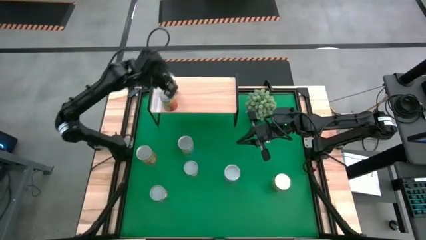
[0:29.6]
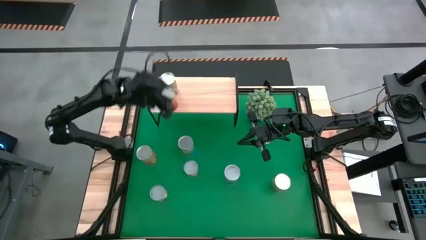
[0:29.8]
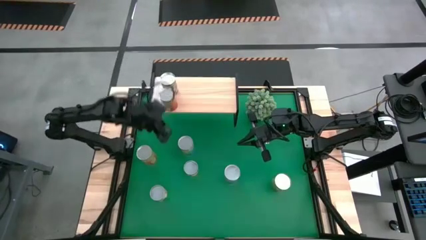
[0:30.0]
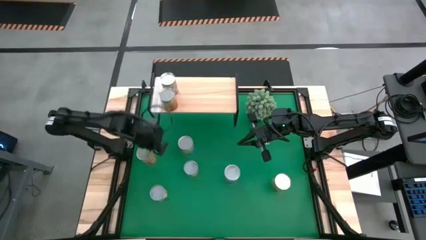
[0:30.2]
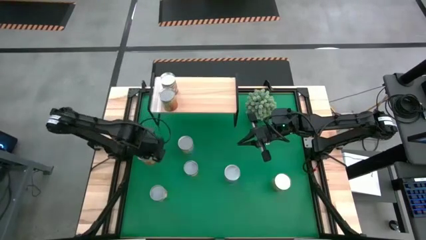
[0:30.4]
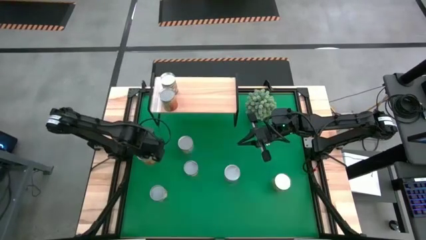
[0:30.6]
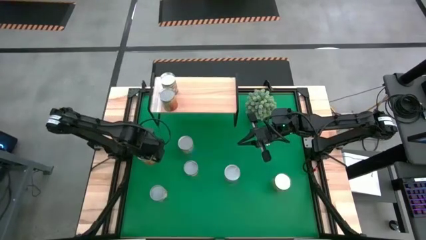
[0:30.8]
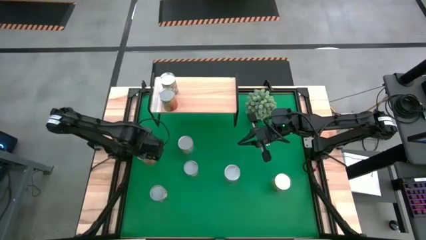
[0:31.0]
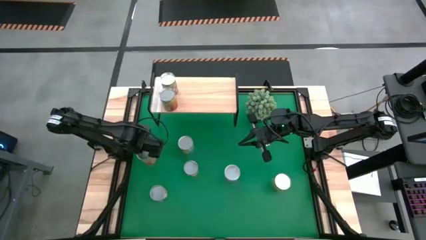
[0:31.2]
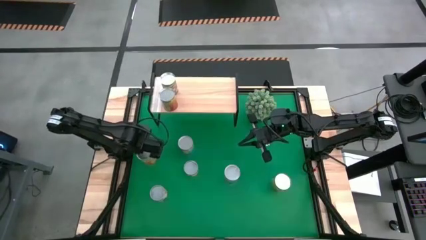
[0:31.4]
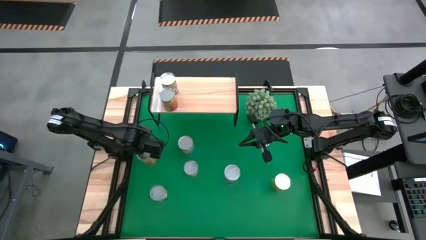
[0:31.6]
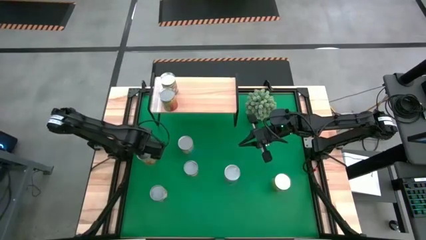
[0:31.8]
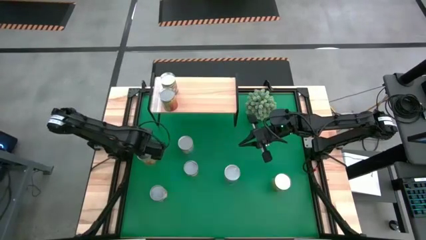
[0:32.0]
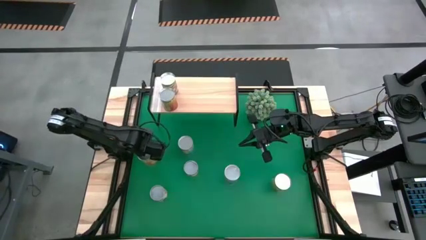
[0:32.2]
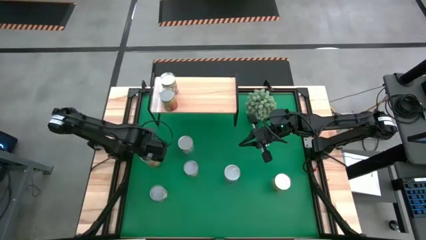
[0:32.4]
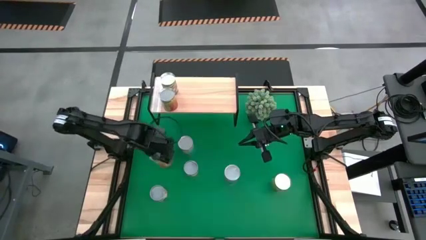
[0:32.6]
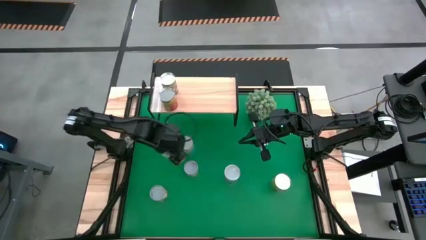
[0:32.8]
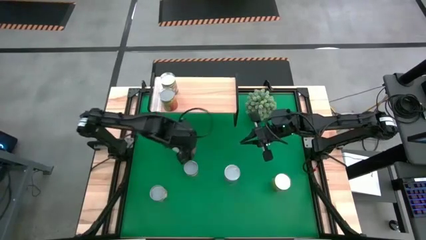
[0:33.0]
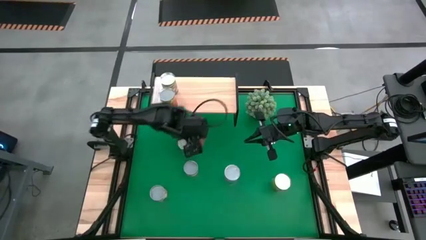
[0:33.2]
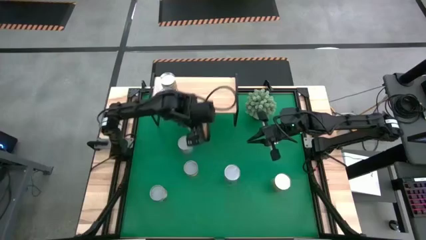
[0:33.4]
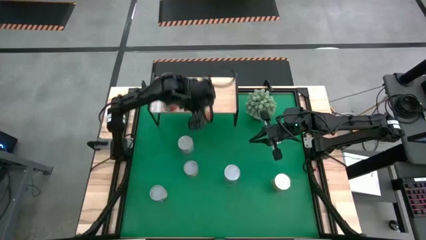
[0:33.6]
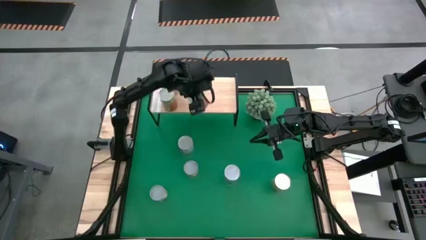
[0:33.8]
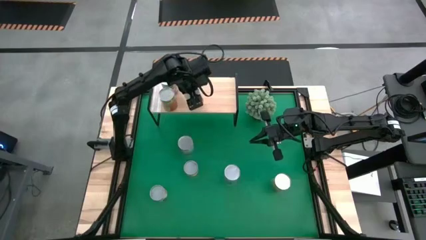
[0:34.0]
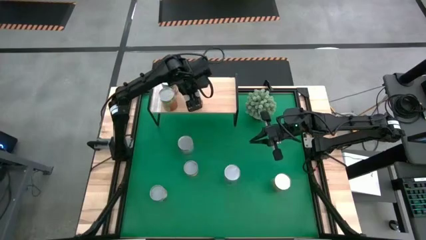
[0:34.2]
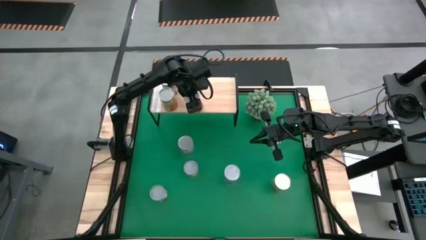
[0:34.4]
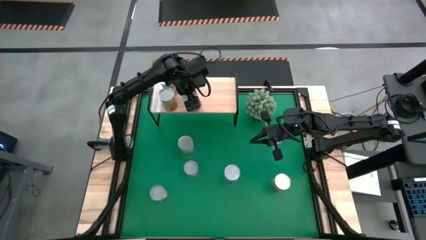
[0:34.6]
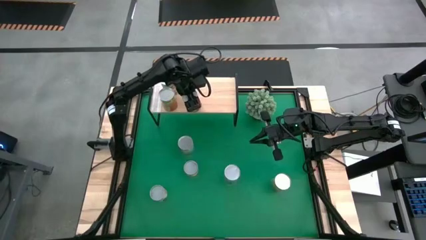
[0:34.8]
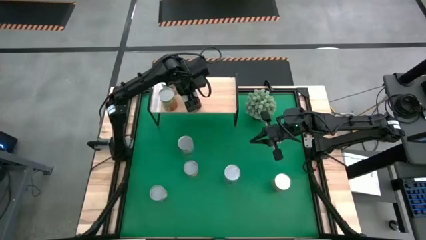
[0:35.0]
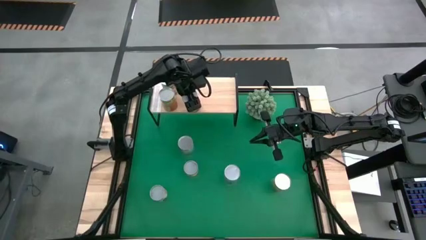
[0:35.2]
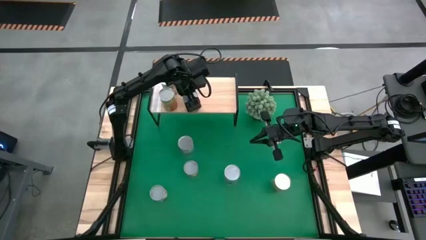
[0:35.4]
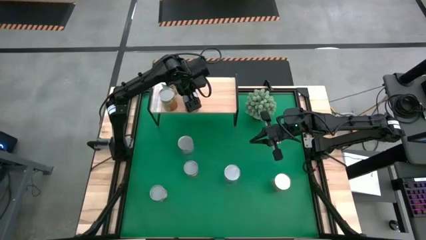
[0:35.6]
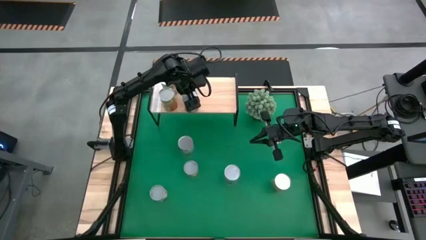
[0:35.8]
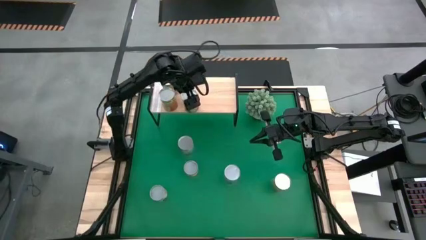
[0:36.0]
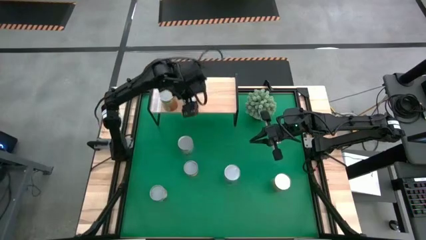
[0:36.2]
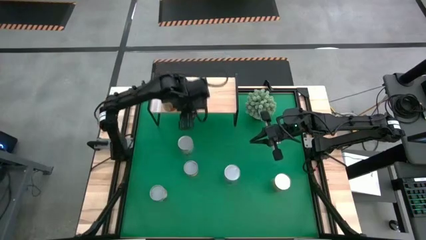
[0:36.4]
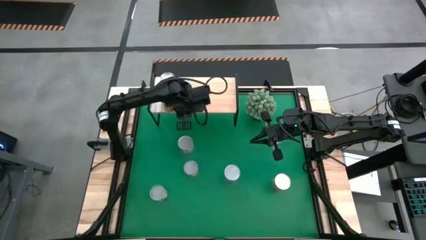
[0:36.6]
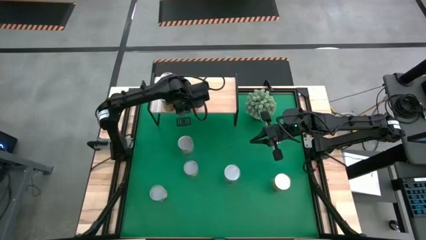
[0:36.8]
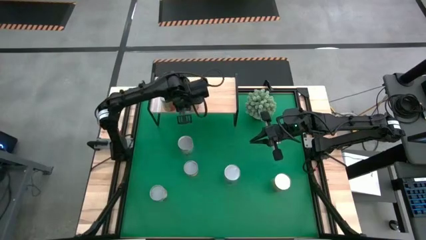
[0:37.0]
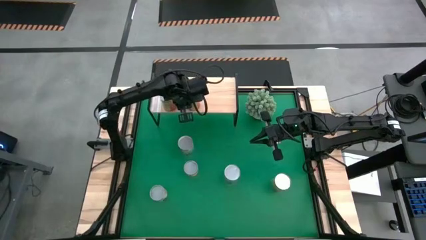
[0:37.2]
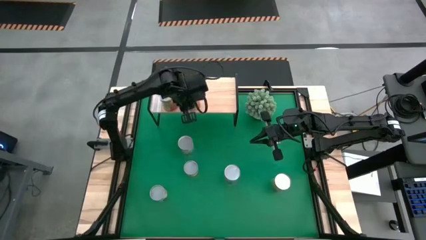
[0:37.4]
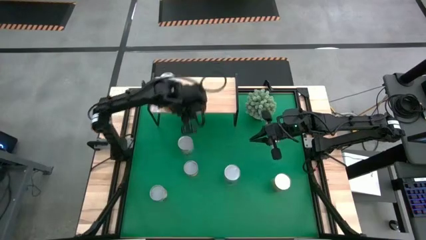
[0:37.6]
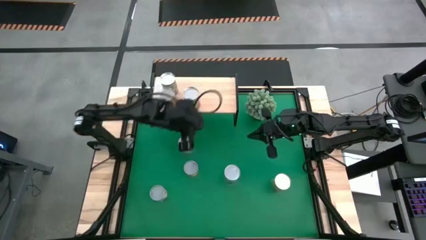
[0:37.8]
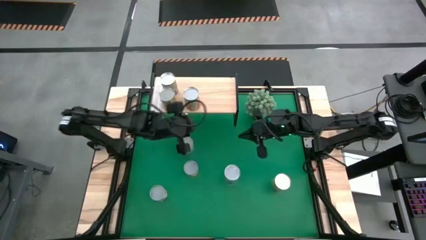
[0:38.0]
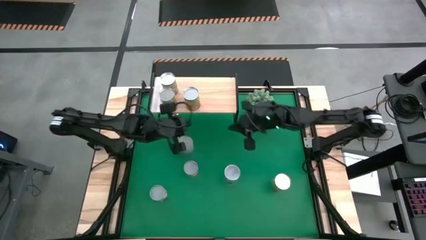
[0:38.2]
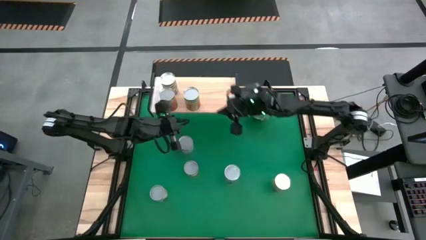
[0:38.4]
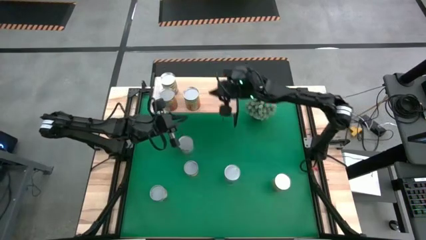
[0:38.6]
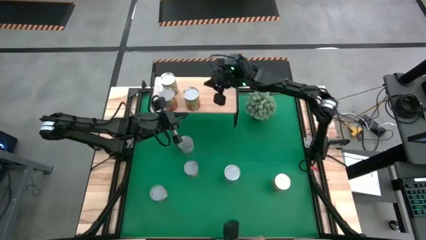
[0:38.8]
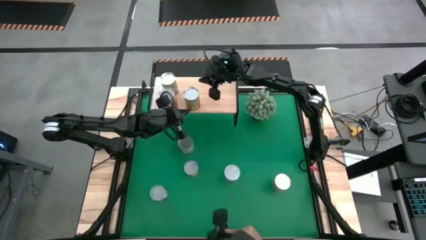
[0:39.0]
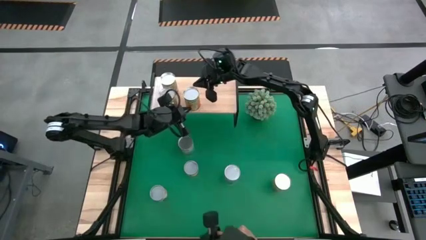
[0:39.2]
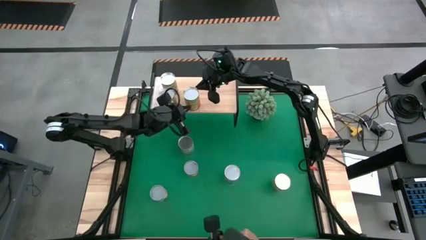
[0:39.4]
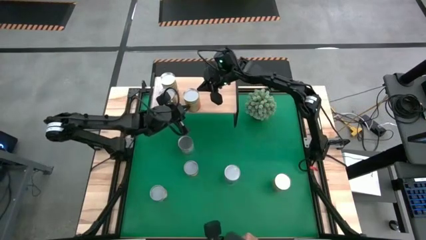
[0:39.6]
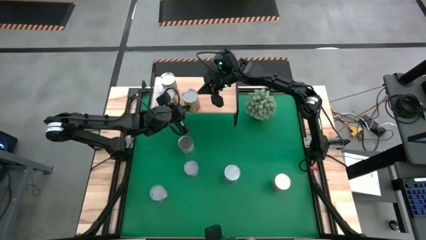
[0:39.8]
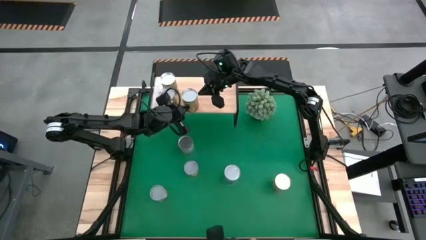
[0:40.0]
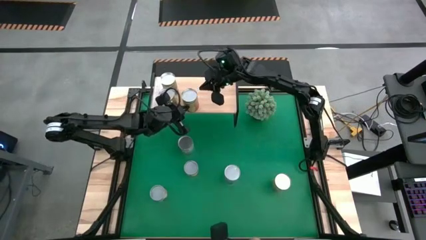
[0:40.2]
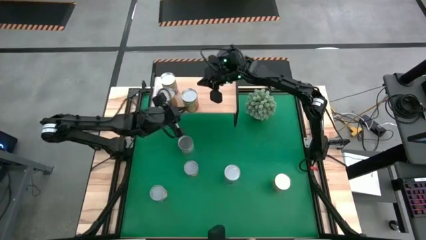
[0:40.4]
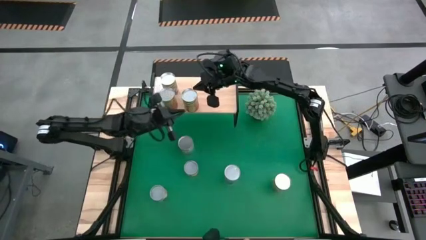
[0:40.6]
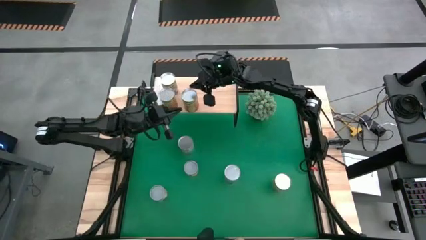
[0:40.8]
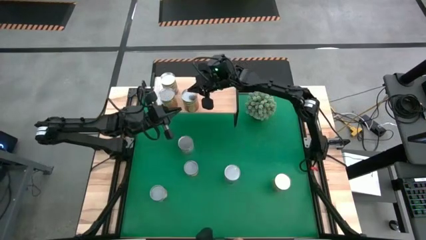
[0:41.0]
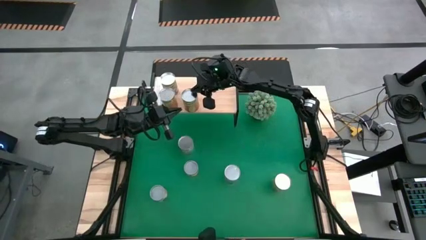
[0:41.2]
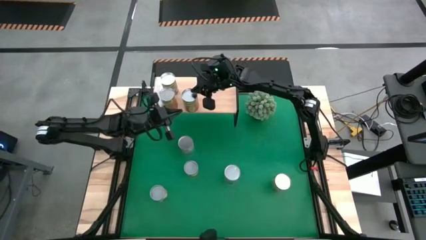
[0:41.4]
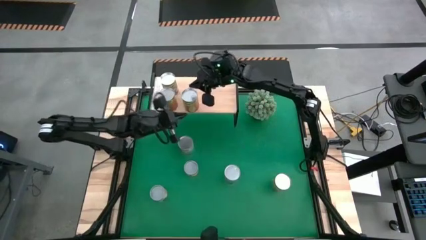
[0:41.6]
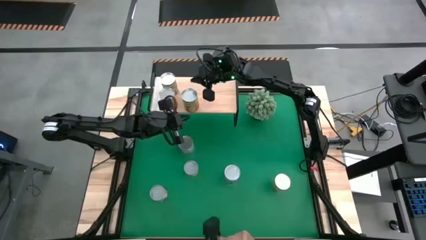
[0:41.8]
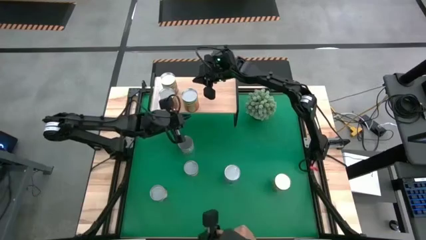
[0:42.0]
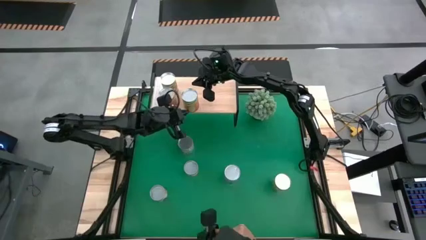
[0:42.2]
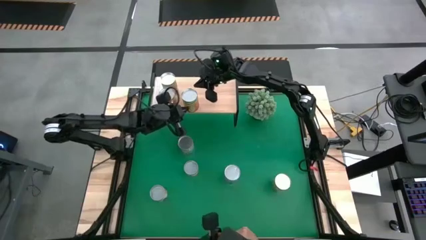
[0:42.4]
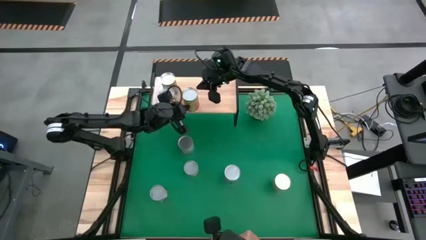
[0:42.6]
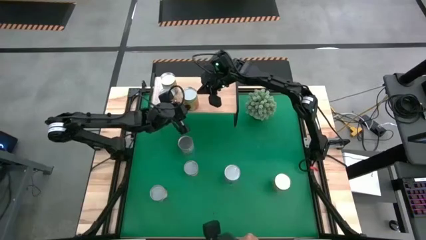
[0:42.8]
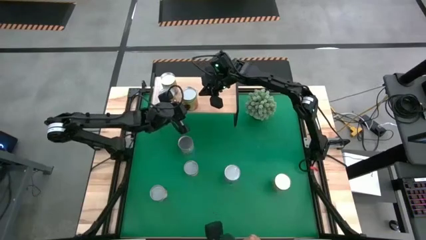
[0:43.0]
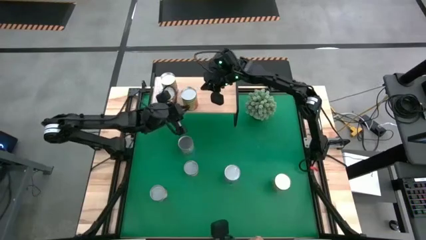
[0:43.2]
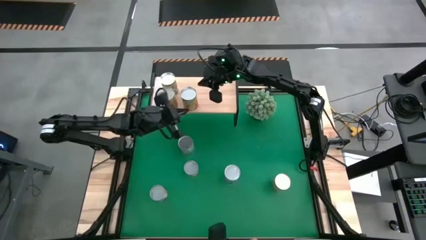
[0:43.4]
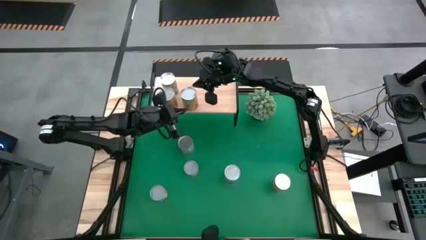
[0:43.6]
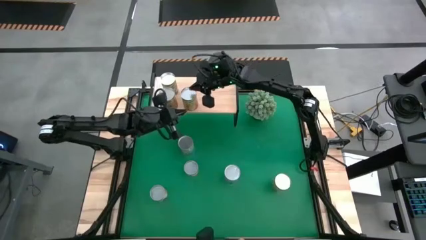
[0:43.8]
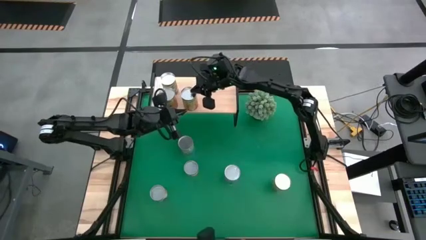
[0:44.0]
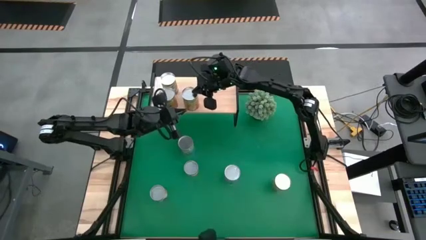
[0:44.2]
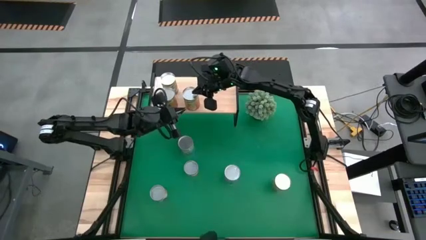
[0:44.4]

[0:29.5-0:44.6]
Task: Pick and place cans onto a shelf
Put the canned pineapple on the shelf
